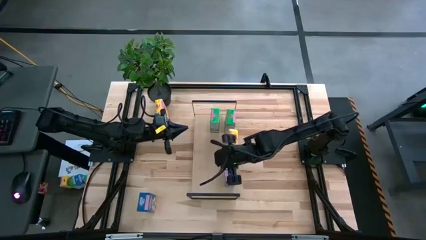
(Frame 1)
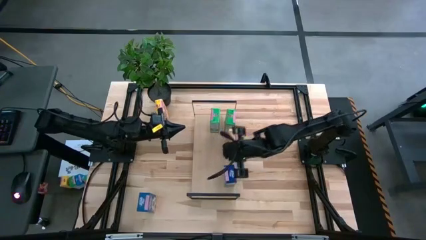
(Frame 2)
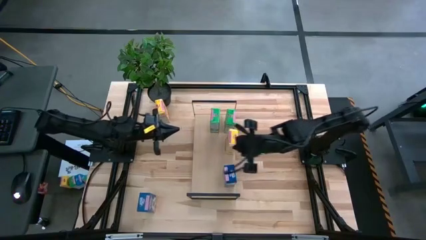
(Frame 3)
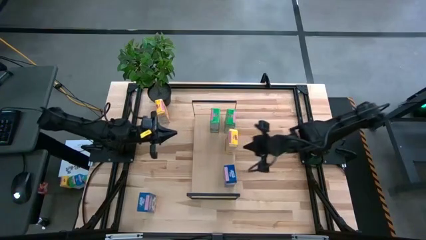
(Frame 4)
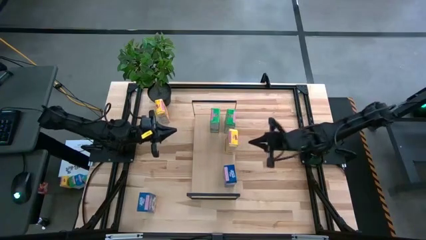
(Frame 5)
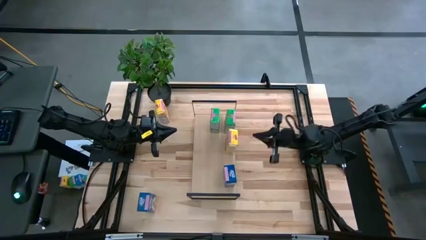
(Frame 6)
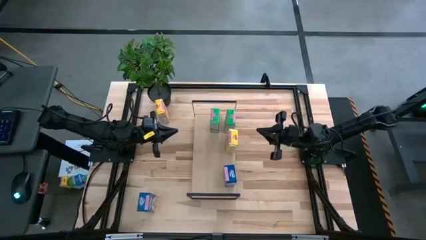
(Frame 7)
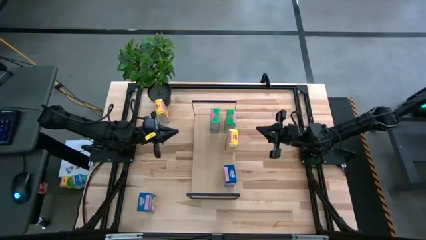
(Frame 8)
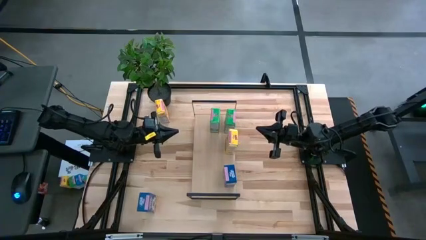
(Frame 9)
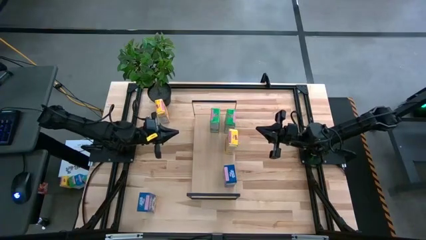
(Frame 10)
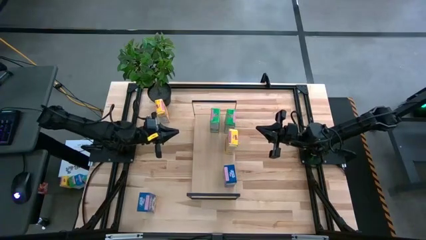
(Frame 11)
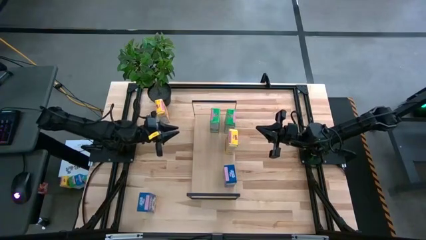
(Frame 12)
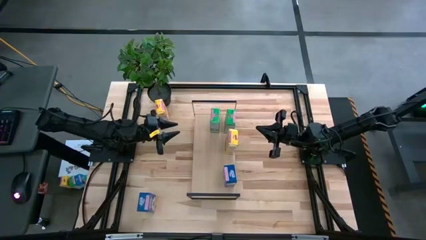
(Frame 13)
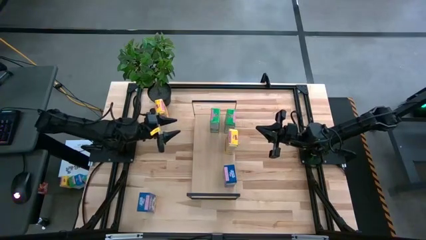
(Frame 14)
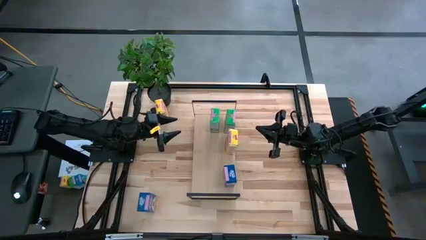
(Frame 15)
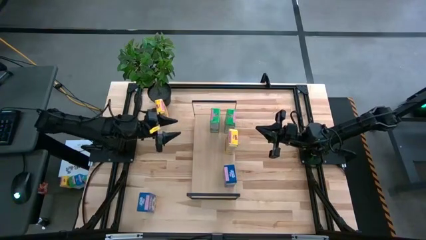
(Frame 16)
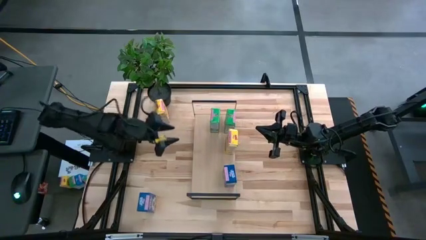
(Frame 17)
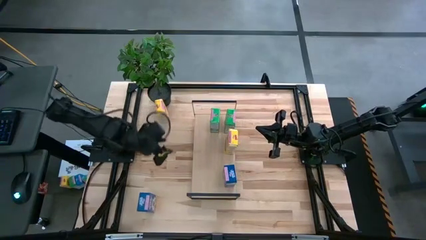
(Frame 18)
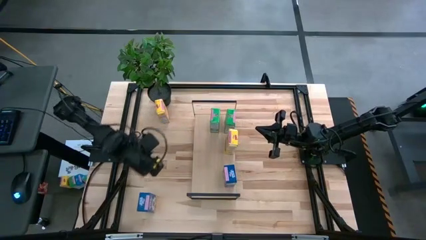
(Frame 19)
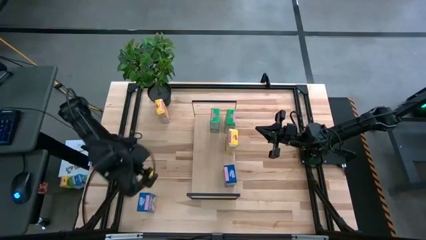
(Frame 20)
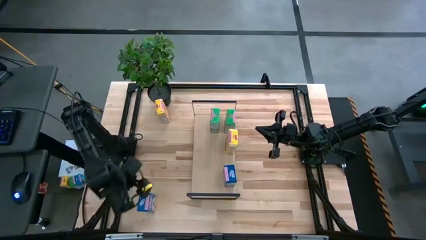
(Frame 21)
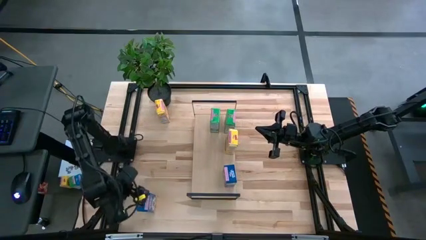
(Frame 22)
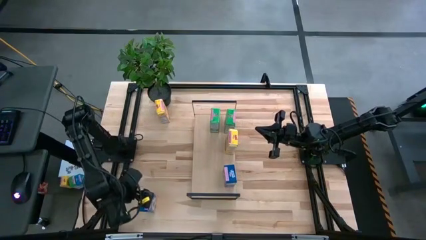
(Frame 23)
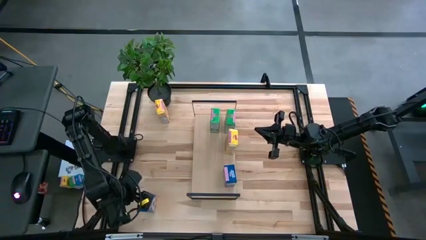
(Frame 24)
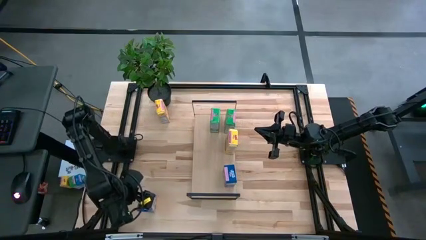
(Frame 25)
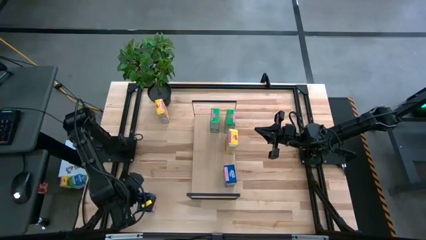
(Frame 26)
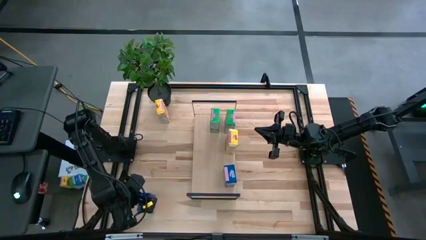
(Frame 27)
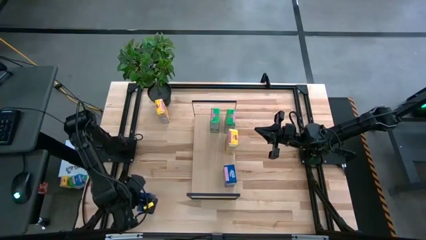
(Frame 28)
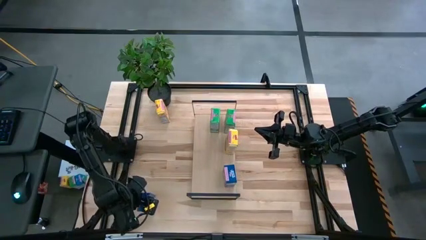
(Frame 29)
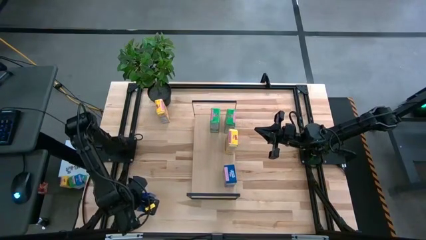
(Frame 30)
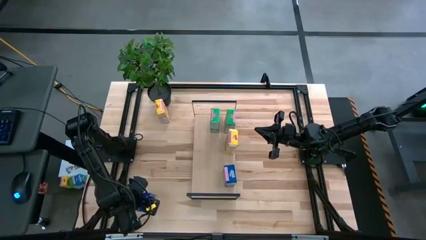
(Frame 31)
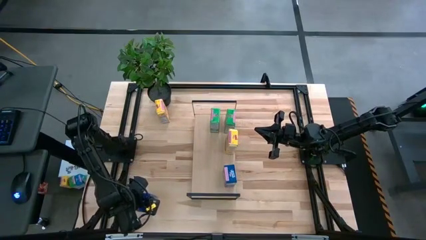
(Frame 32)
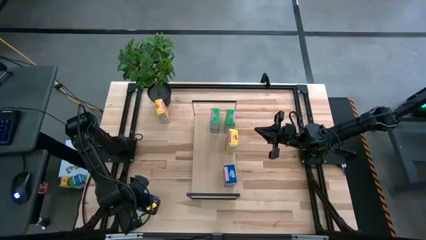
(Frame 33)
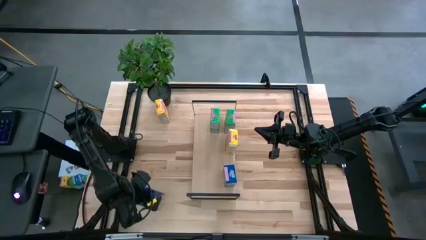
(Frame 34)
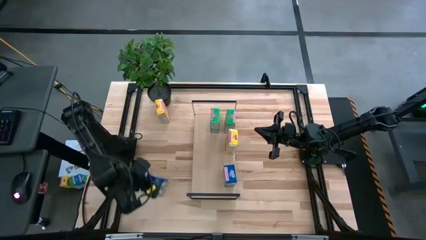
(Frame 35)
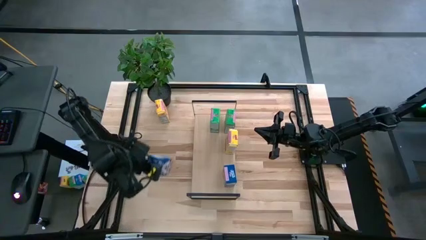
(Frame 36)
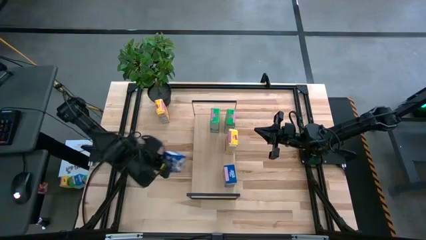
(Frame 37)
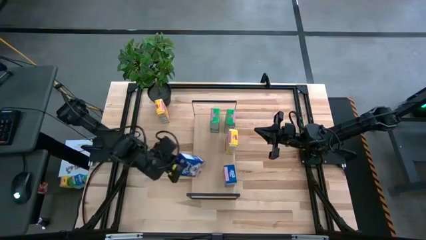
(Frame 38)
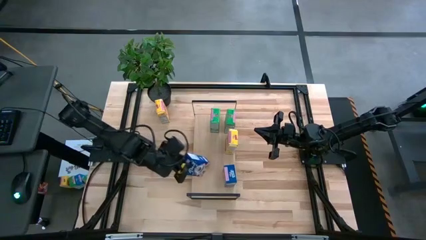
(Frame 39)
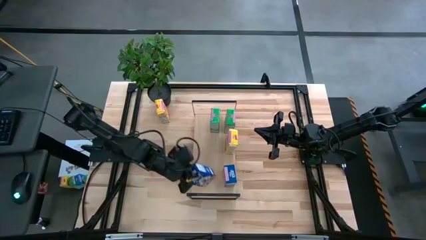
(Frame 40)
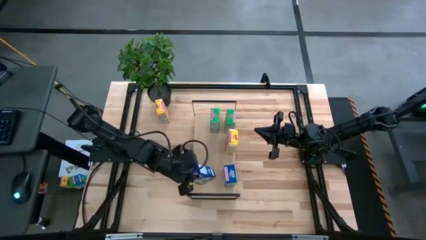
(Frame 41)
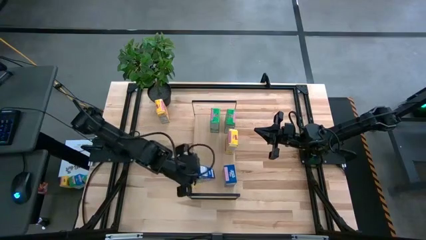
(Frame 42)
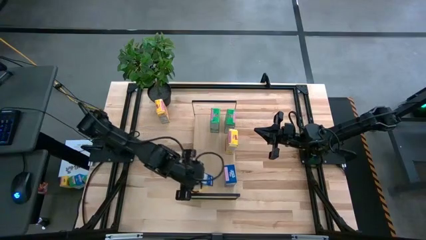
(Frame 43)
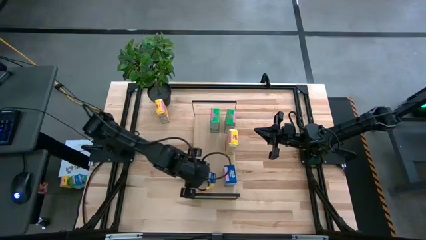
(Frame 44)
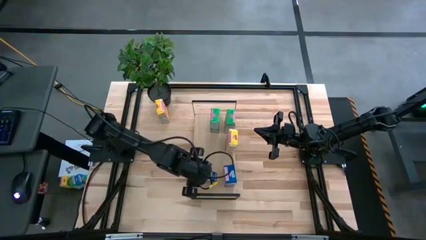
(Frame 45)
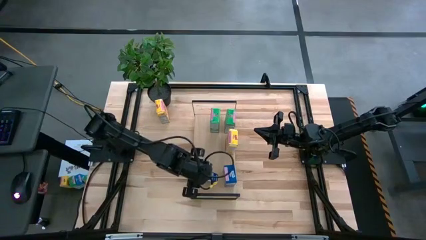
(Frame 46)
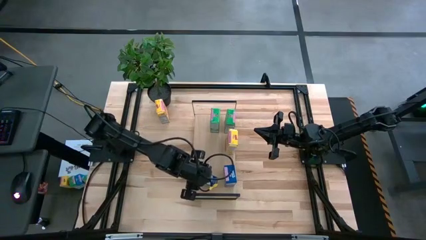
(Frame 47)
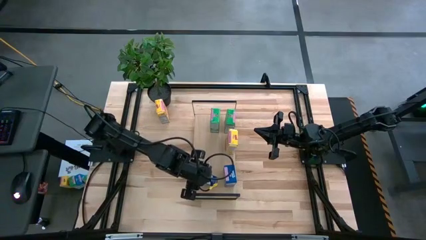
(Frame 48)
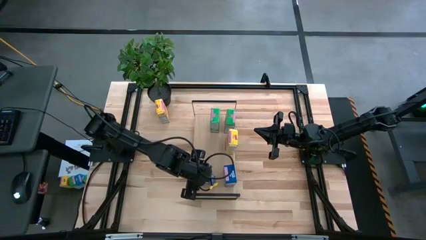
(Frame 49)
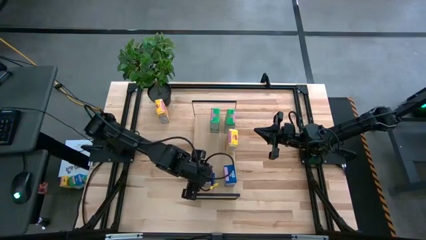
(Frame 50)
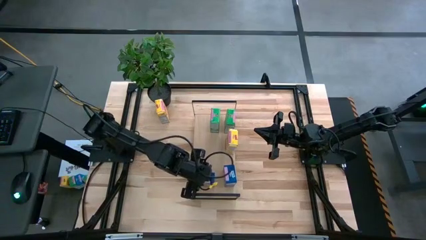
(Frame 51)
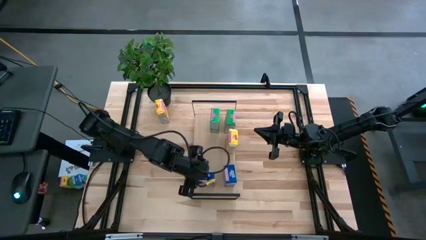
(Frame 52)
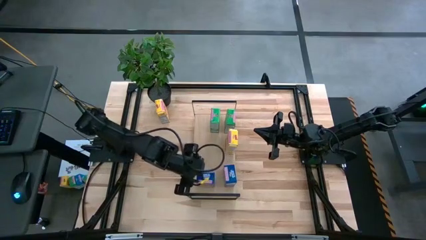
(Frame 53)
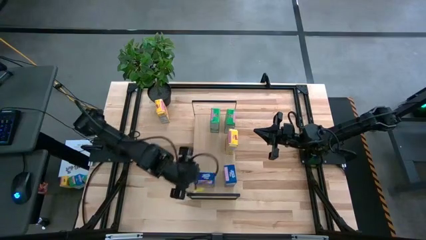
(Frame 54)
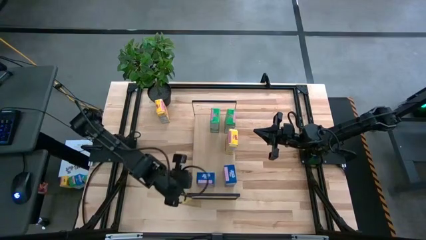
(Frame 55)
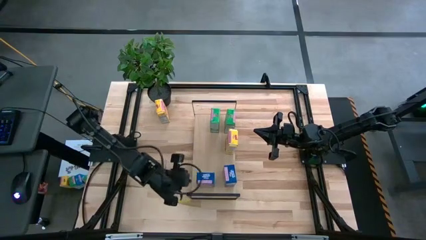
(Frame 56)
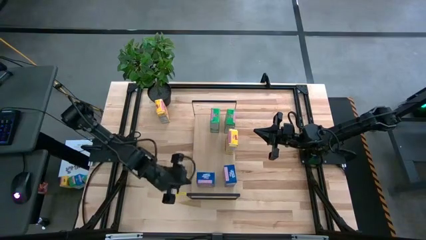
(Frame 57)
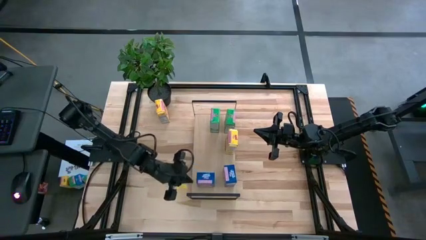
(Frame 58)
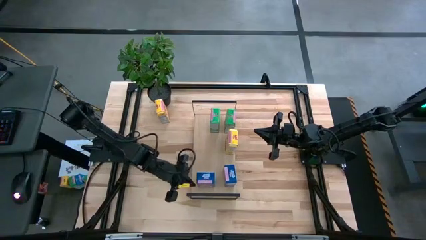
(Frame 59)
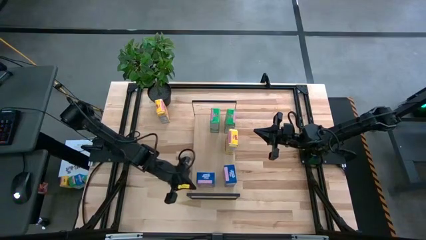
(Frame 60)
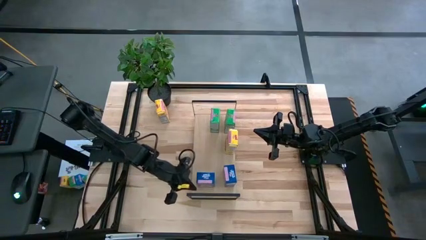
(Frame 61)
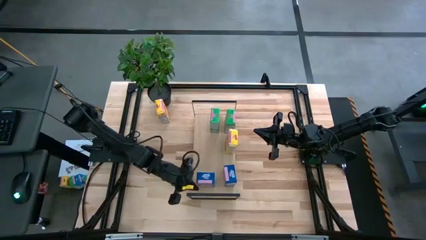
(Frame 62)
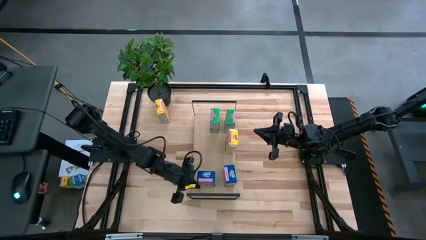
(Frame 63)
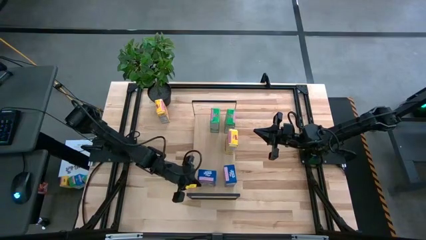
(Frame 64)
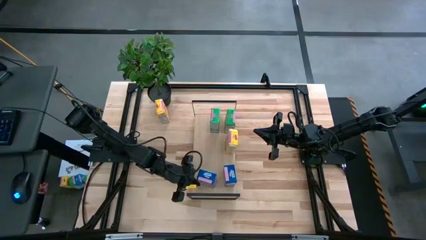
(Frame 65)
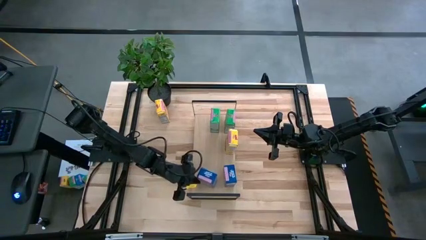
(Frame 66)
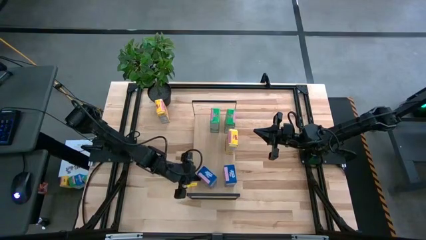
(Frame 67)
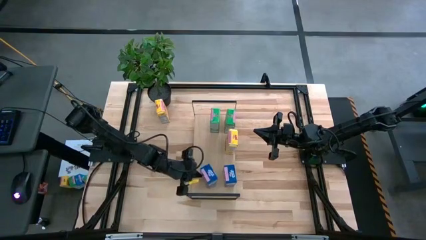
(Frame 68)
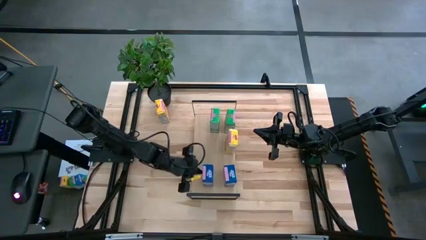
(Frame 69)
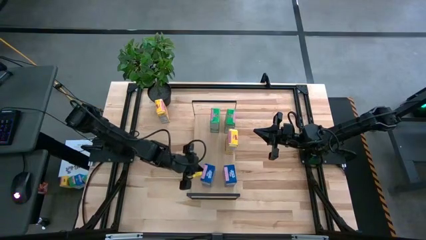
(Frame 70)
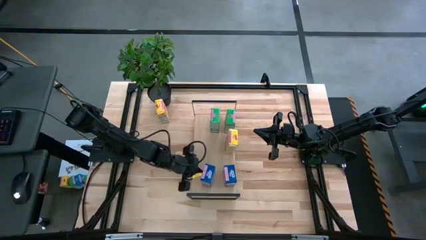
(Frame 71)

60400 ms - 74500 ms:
Task: Stack cereal on shelf
Put the blue cereal box aligned with the other blue cereal box on the shelf

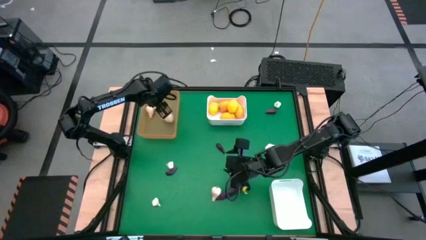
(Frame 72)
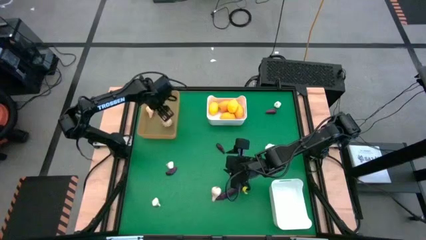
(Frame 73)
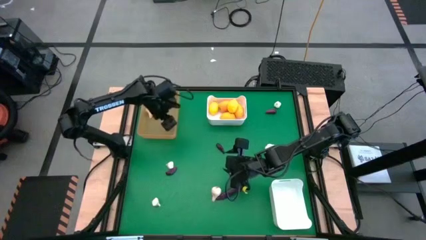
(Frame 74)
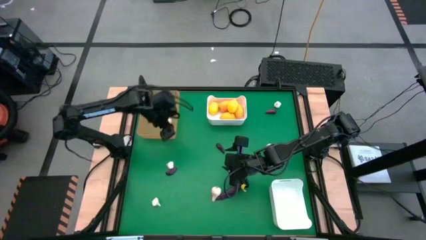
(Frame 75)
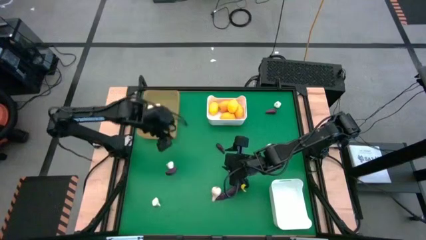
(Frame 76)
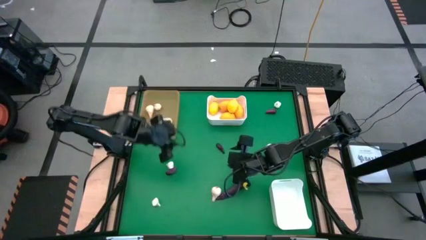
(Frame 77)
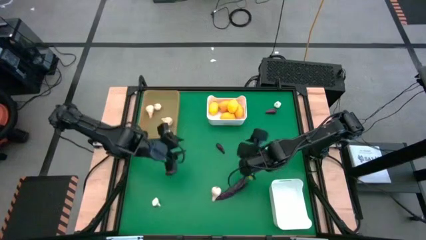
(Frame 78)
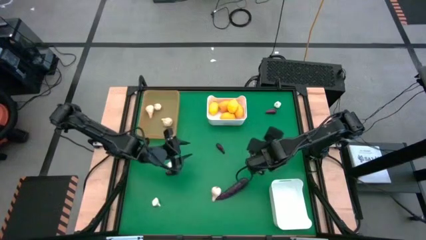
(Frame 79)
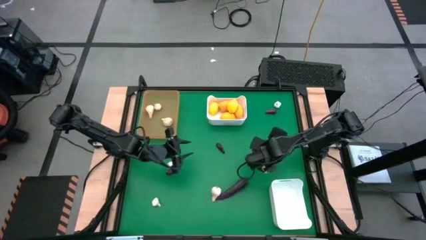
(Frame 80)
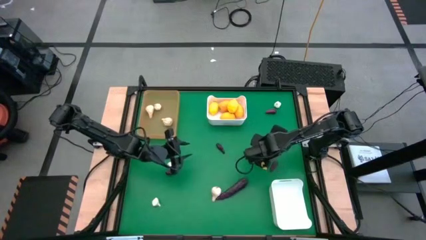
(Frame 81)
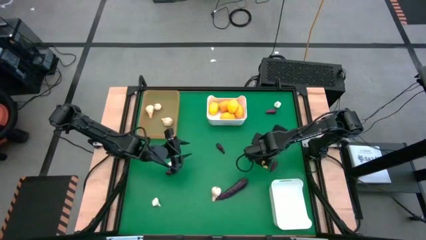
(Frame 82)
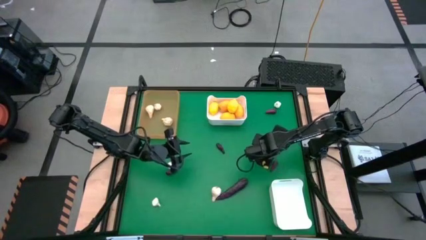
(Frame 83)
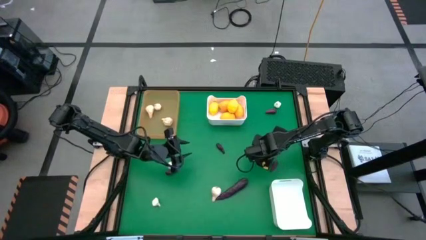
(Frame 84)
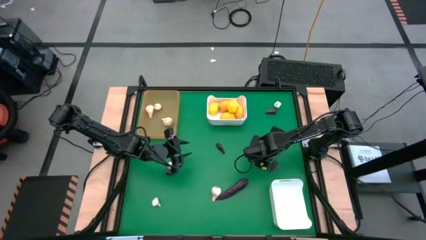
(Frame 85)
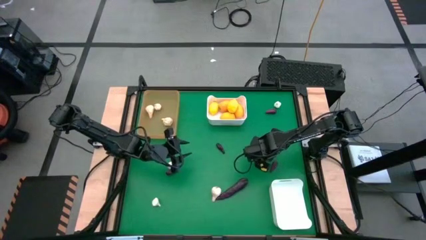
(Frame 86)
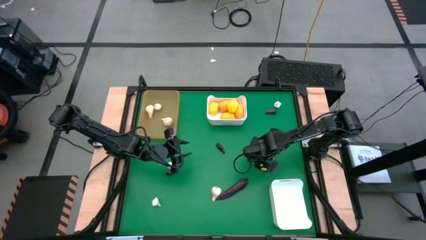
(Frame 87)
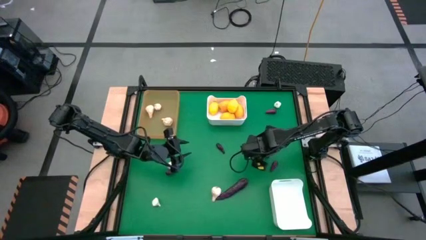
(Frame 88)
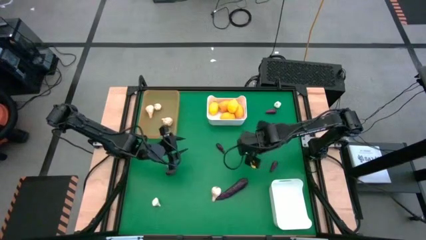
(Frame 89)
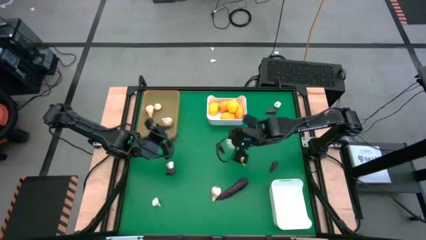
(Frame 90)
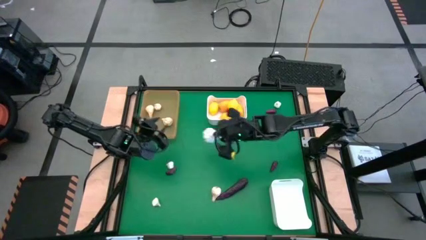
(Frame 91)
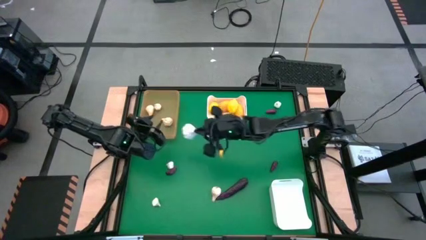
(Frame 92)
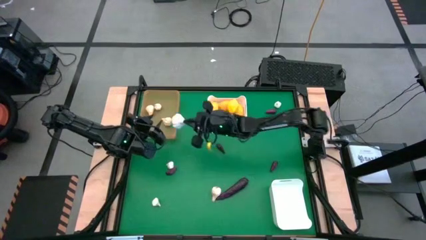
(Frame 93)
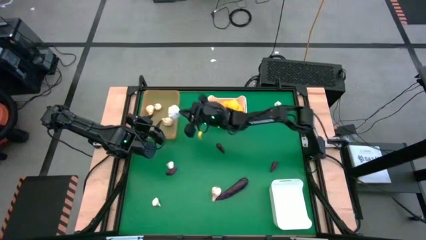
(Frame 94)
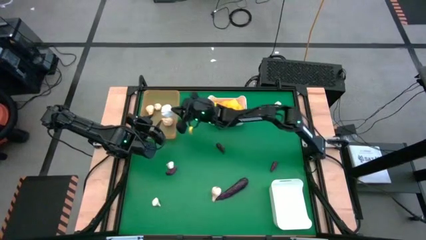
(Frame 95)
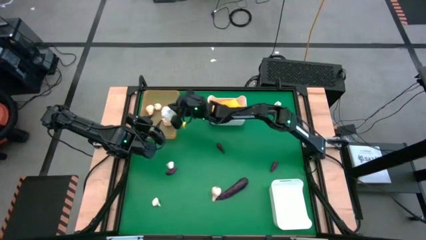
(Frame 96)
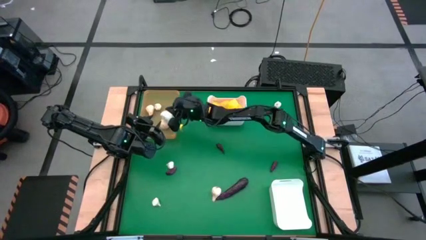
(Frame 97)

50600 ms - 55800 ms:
Task: Sort produce into baskets
Put the garlic into the orange bin
